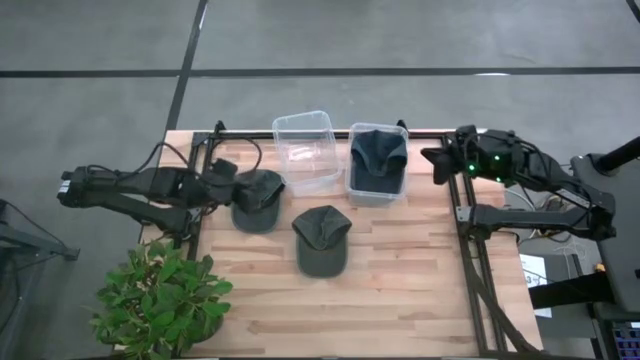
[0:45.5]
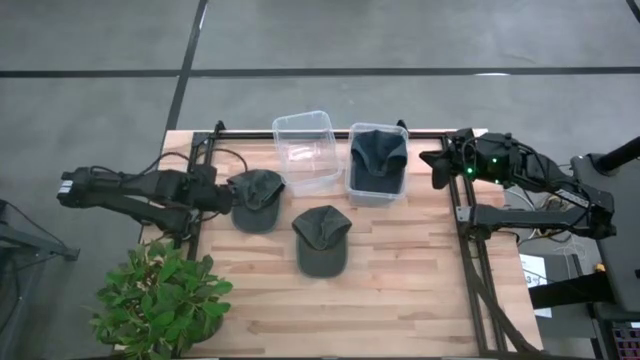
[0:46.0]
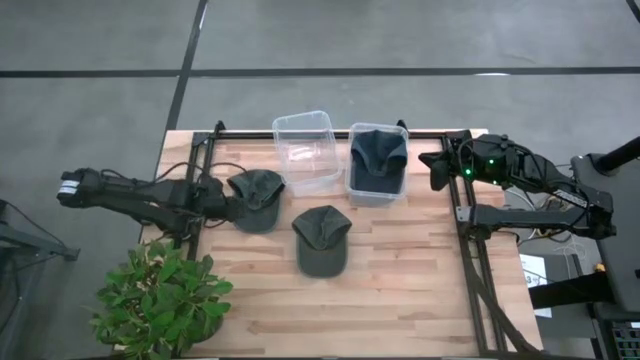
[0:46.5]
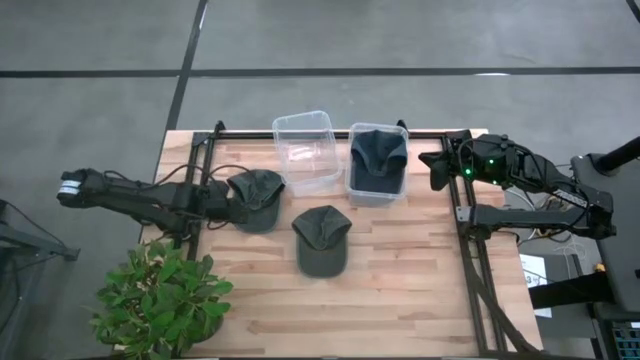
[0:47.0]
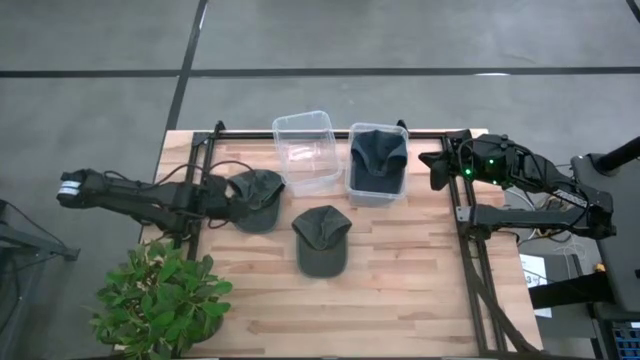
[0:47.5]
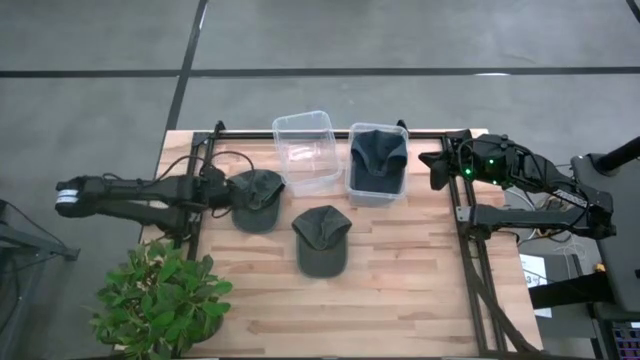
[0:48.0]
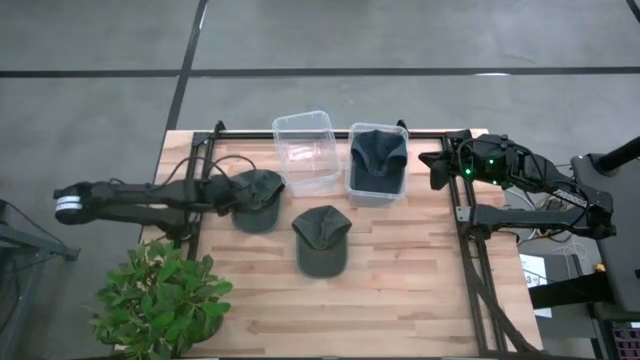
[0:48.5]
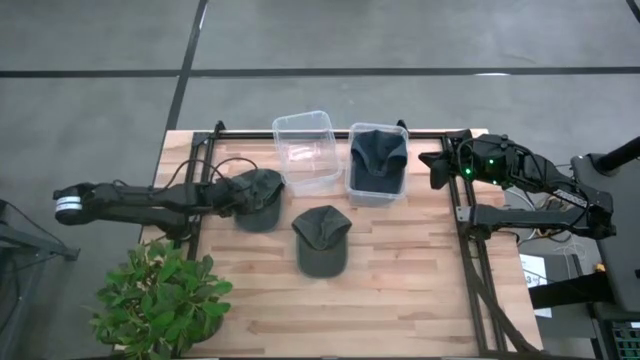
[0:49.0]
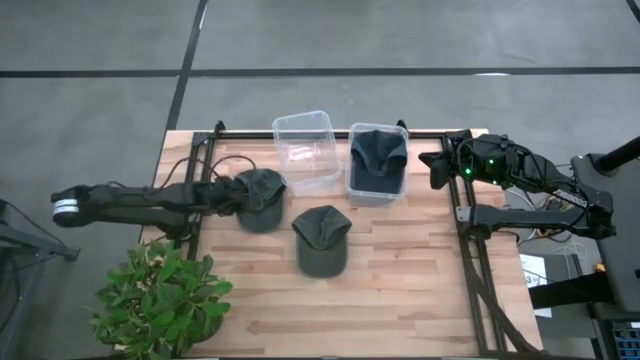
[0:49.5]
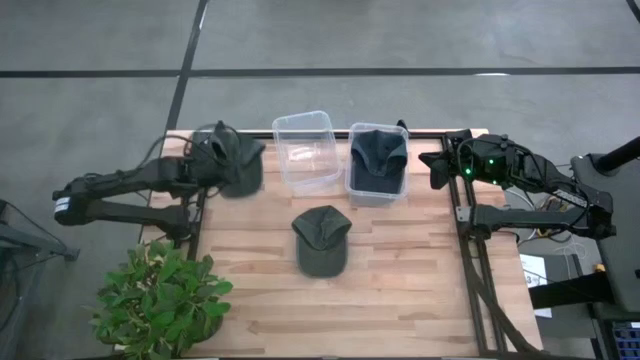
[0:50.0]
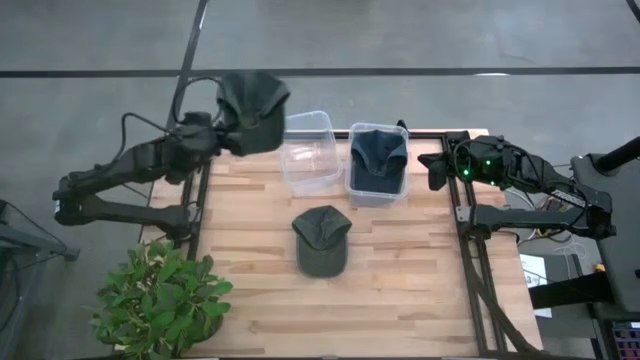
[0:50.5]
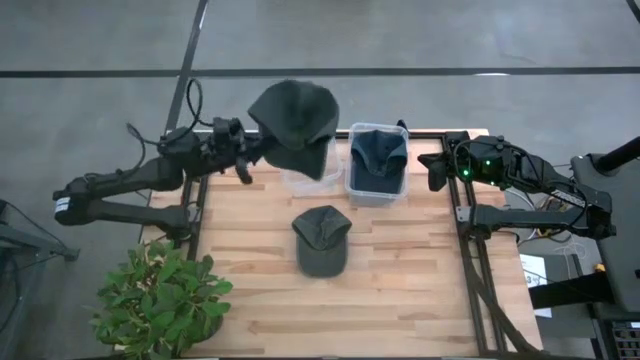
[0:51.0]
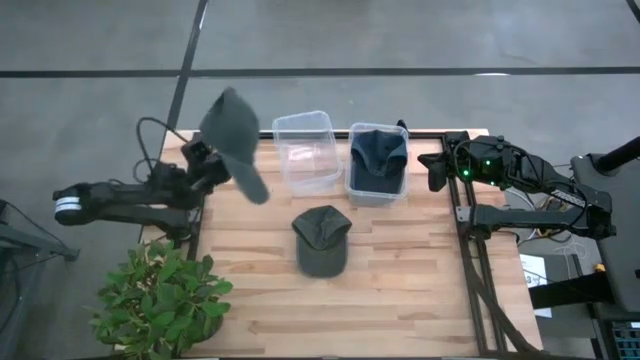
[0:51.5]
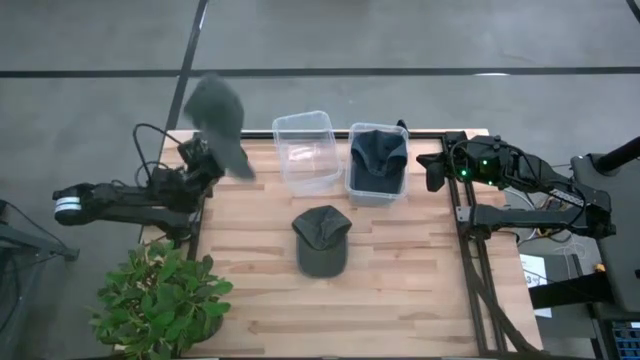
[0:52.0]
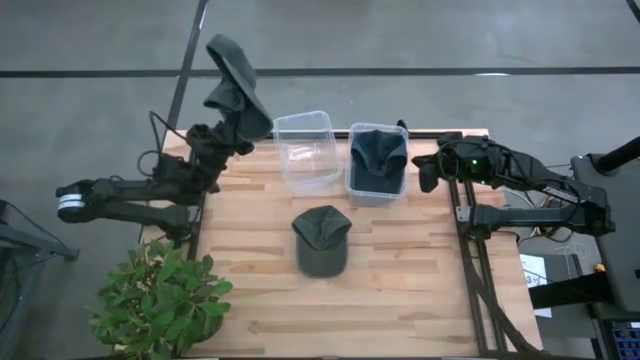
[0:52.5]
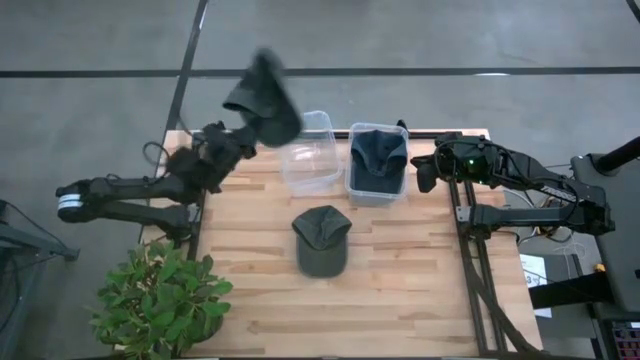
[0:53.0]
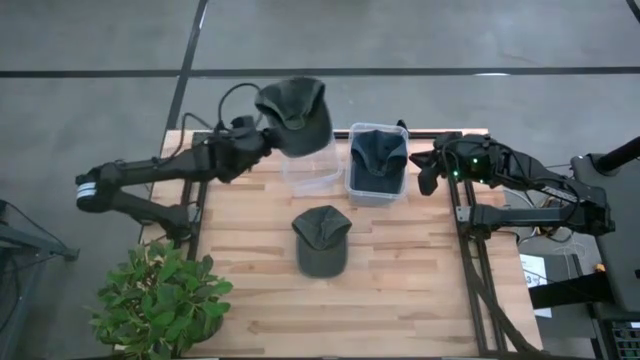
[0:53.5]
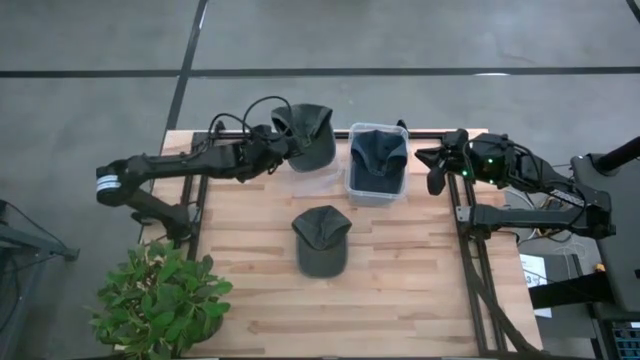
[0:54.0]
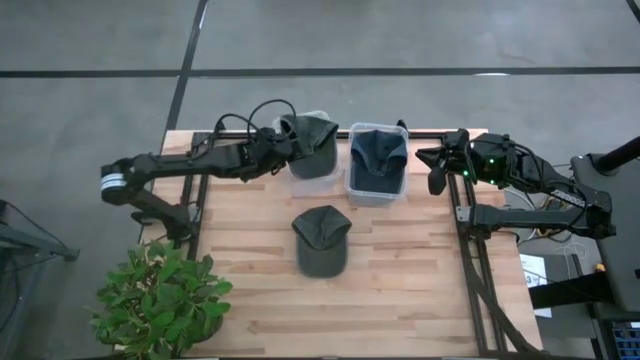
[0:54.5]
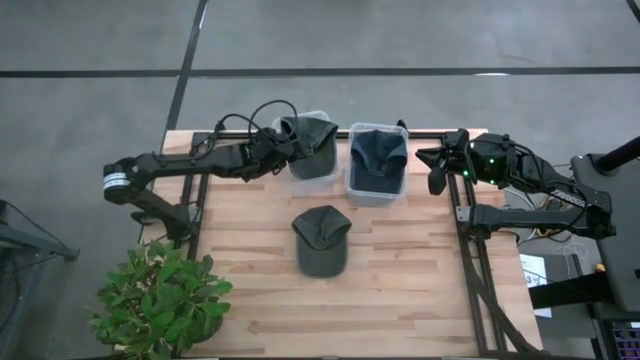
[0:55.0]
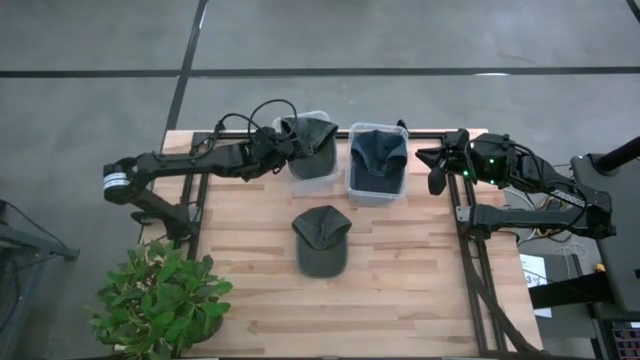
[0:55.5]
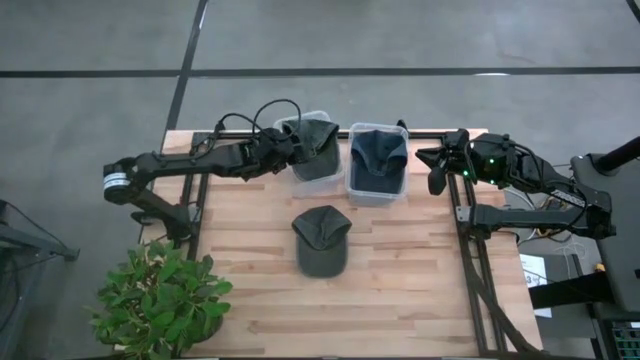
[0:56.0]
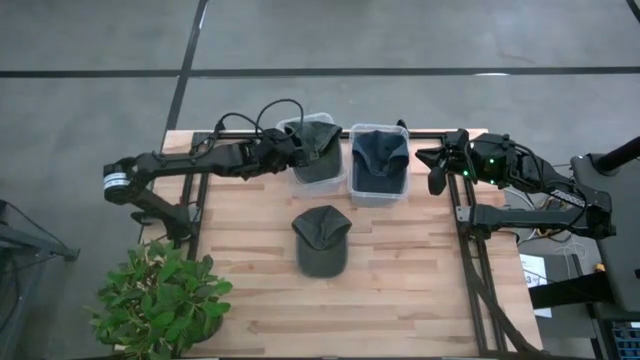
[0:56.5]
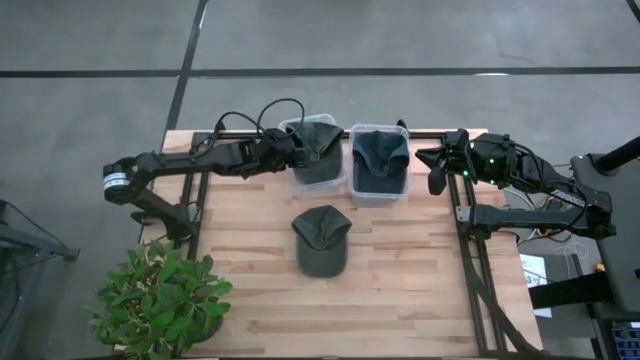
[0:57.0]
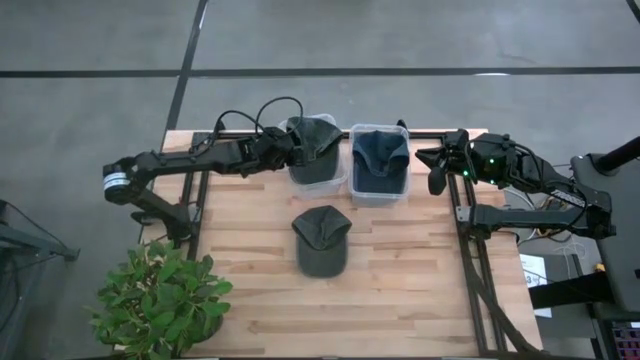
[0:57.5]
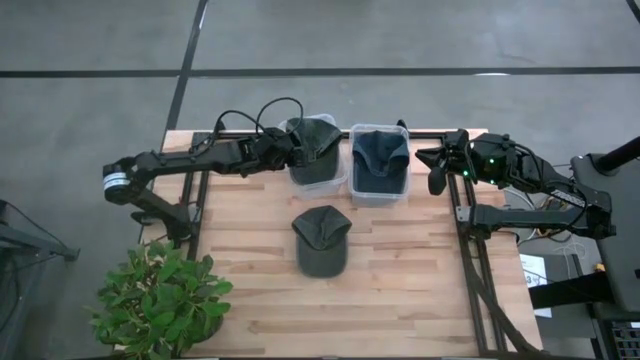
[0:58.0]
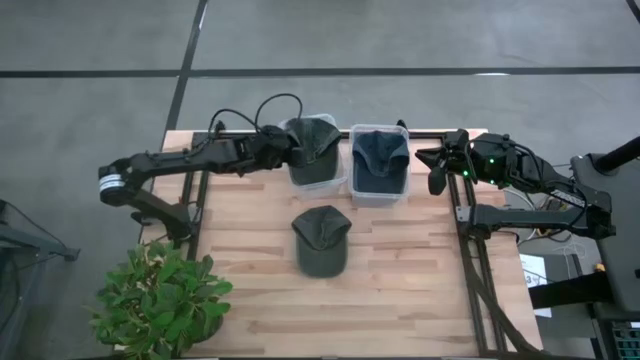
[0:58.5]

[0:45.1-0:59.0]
Task: Pick & Place hat
Put the top gray cap into the left transparent bin

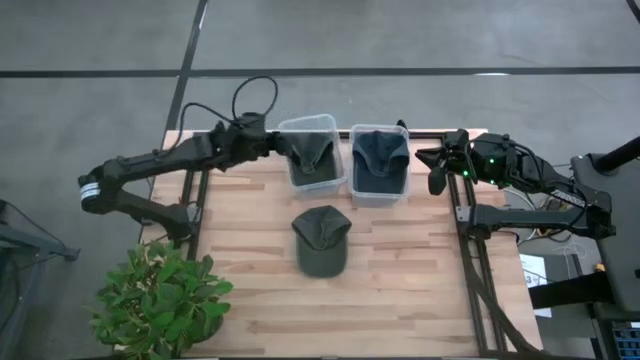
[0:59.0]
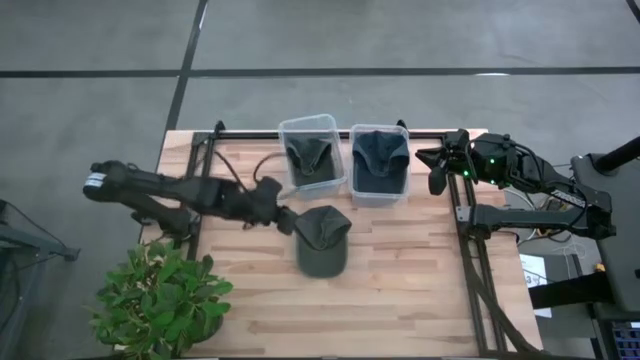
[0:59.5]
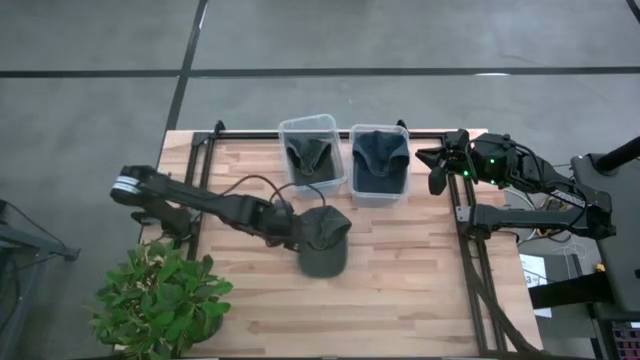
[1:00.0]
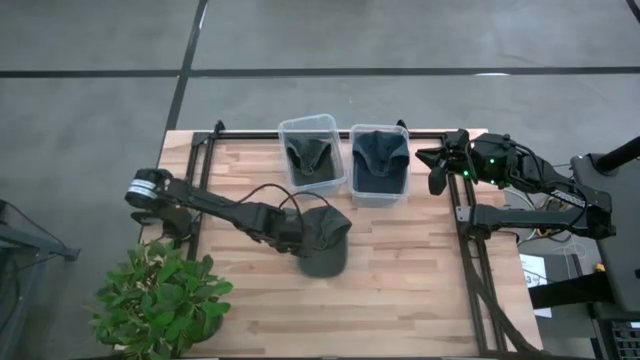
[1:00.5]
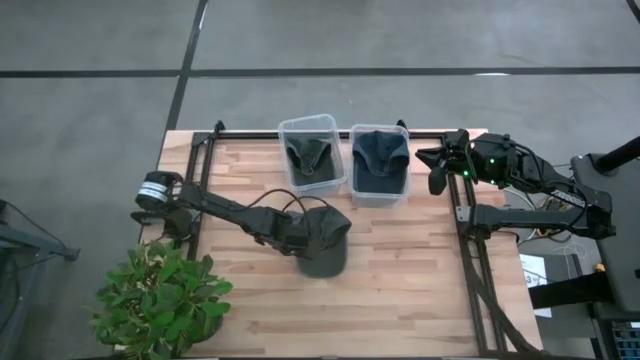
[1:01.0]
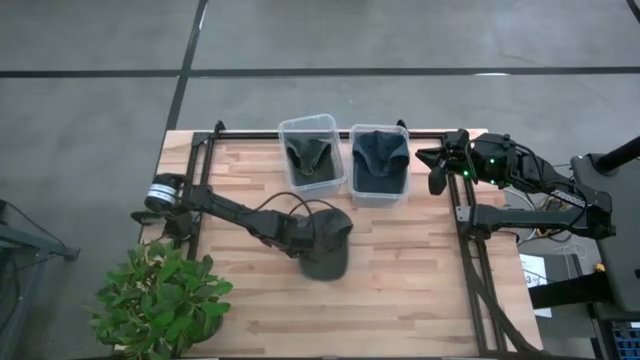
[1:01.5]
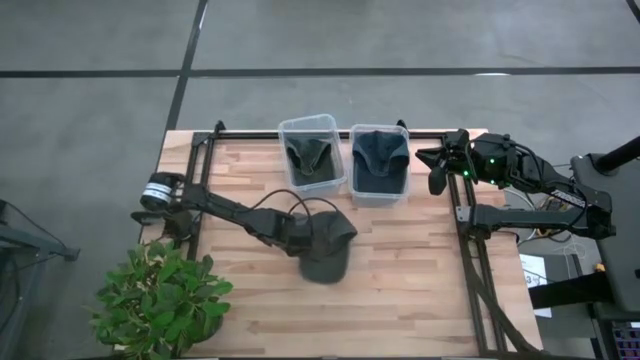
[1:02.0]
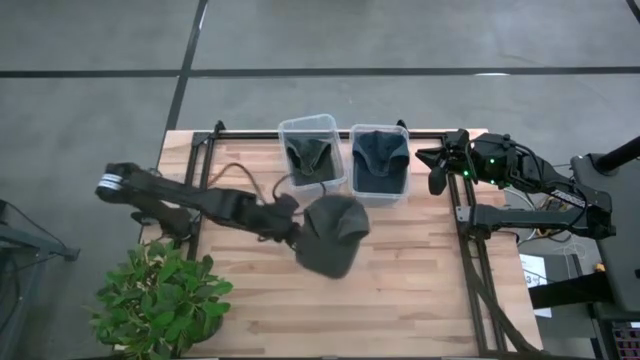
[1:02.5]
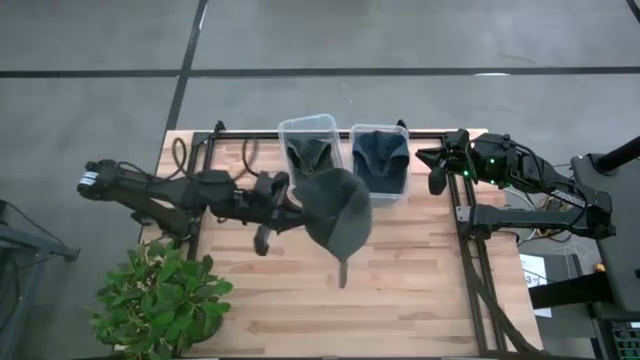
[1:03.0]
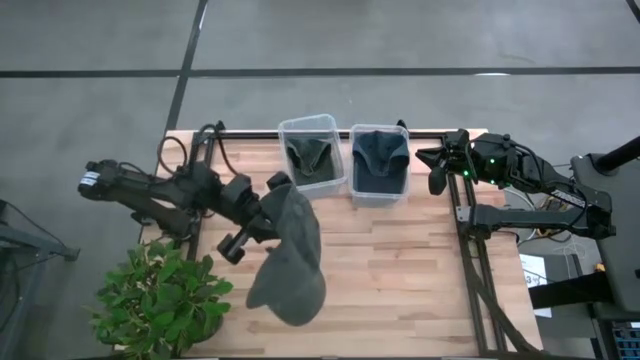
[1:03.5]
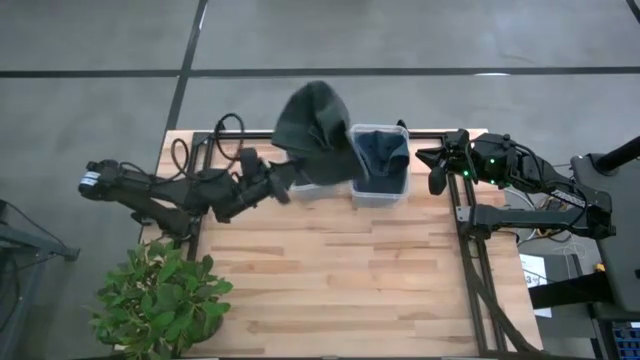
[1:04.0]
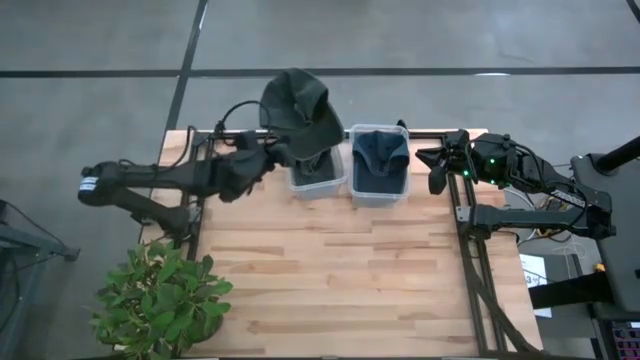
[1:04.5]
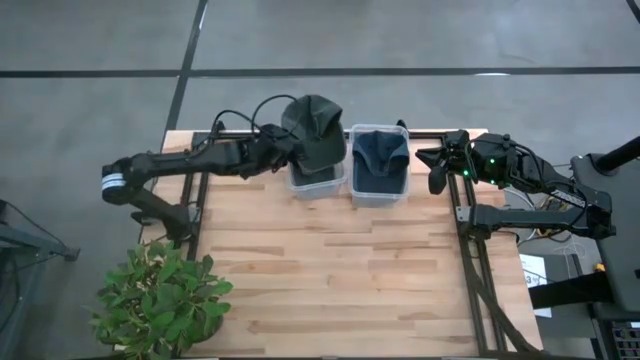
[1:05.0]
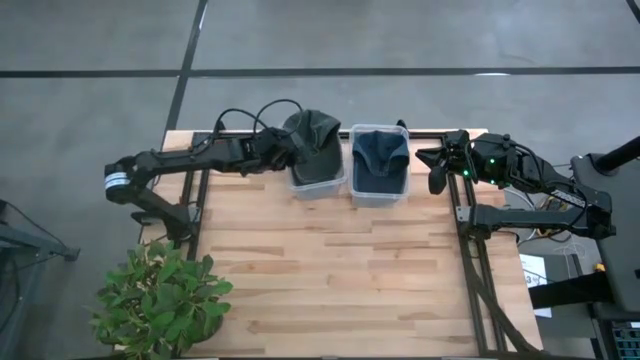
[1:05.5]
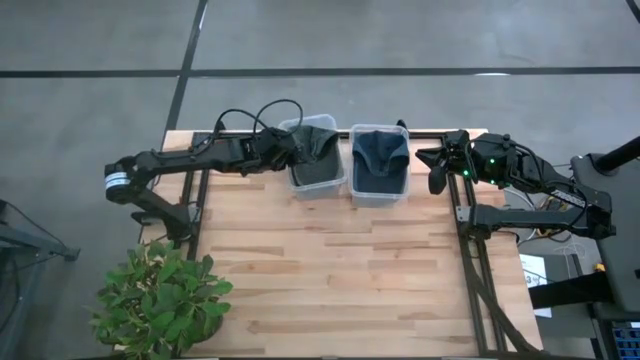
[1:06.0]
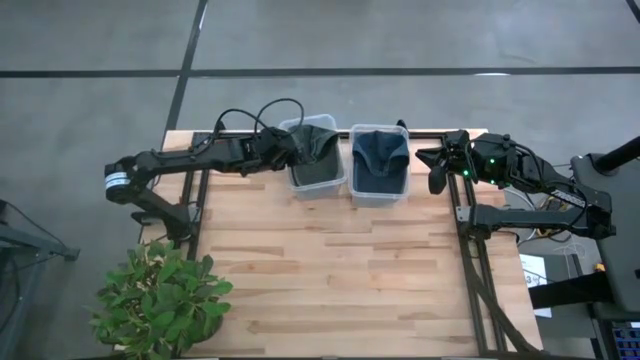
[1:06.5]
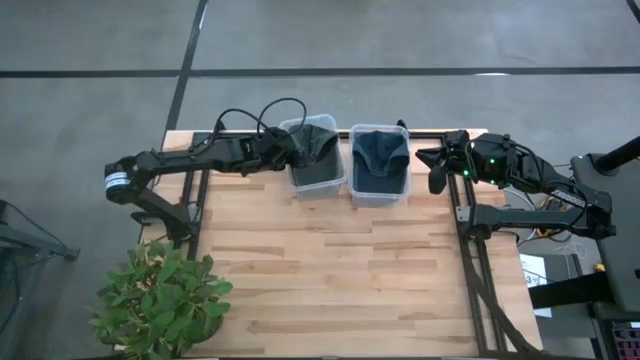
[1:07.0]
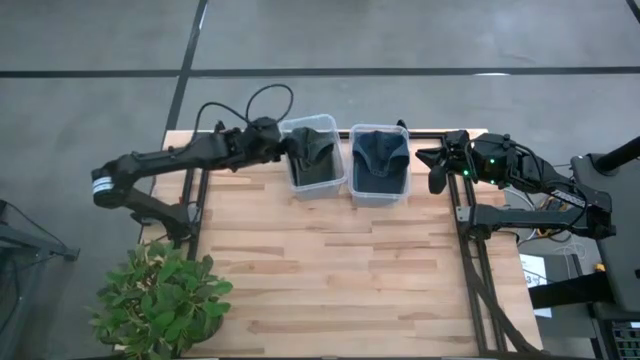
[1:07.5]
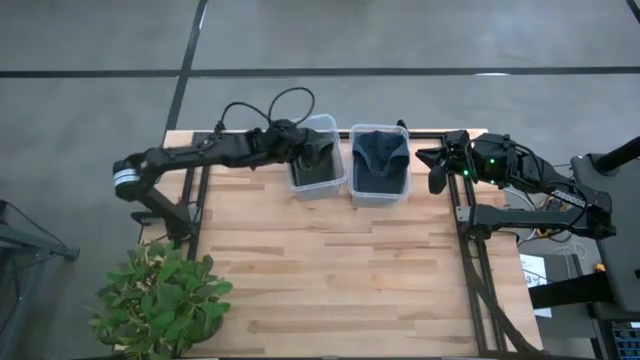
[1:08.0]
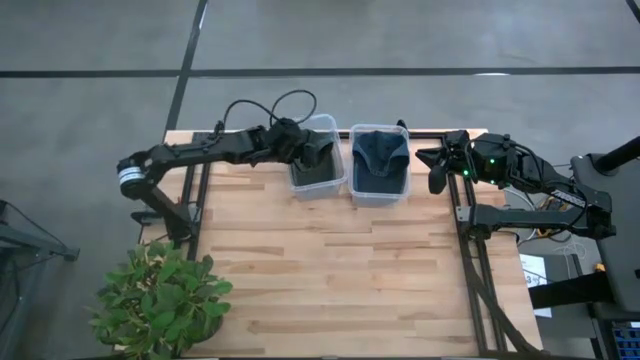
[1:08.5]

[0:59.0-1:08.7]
Put the gray cap into the left transparent bin
